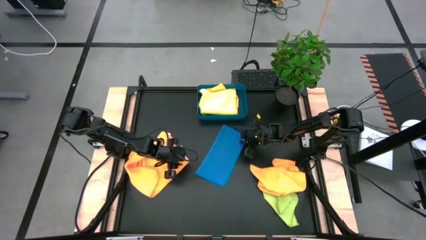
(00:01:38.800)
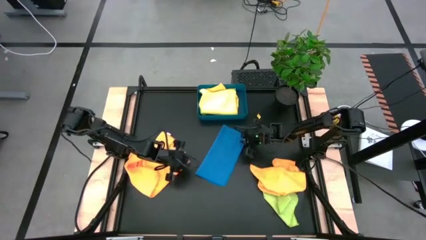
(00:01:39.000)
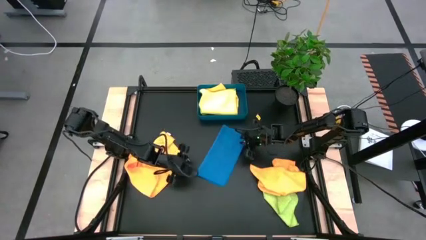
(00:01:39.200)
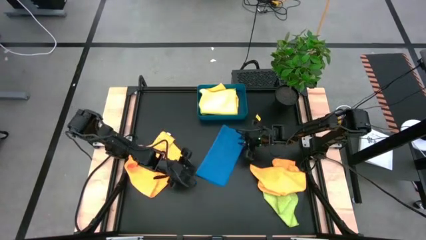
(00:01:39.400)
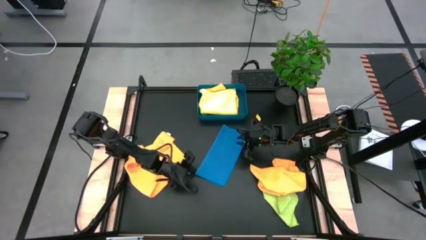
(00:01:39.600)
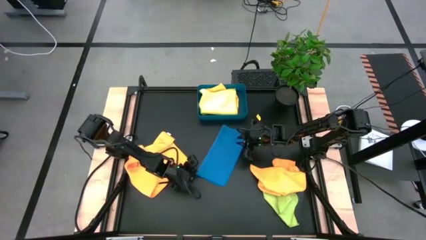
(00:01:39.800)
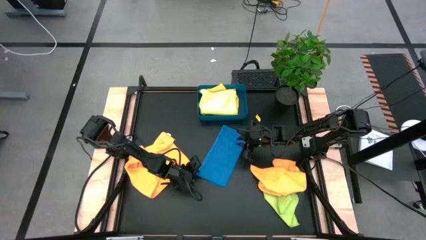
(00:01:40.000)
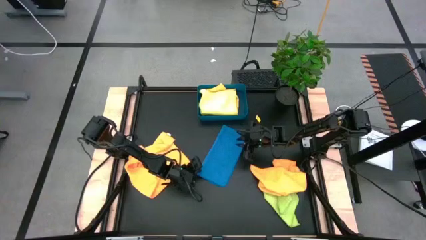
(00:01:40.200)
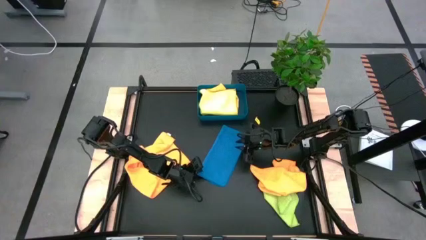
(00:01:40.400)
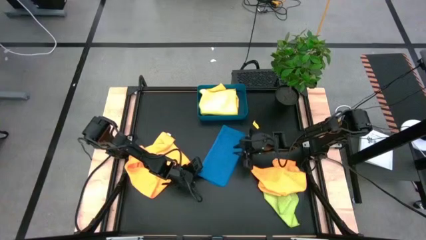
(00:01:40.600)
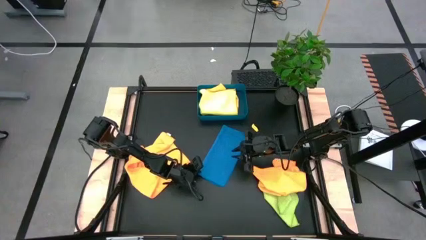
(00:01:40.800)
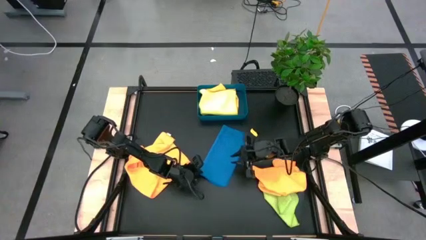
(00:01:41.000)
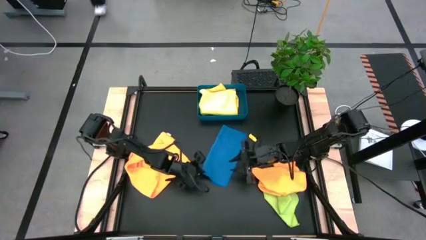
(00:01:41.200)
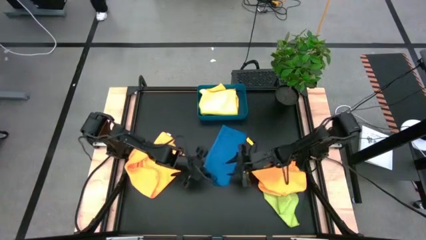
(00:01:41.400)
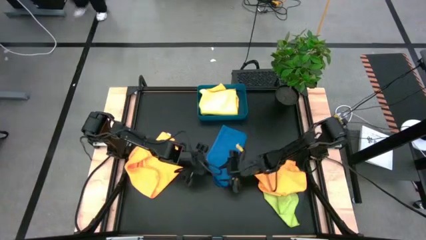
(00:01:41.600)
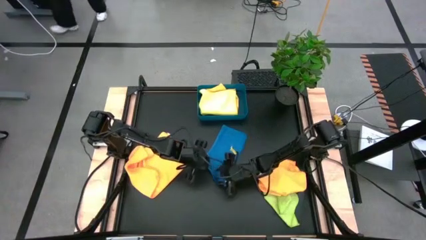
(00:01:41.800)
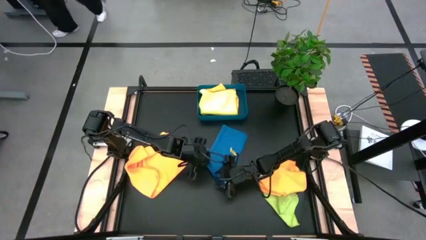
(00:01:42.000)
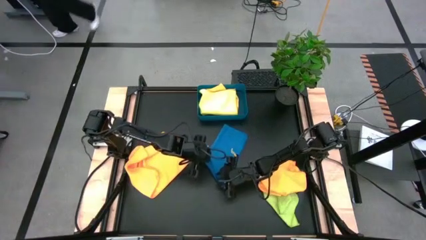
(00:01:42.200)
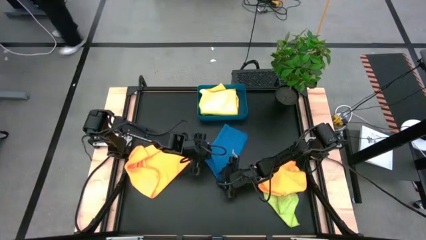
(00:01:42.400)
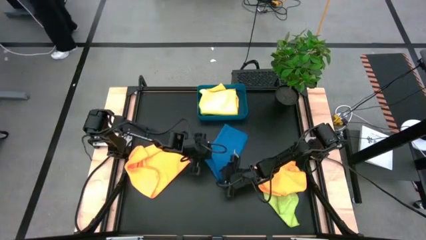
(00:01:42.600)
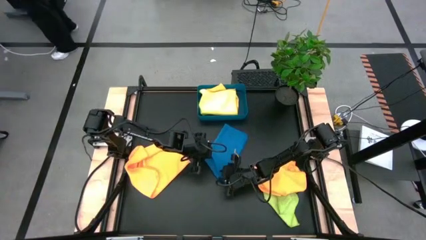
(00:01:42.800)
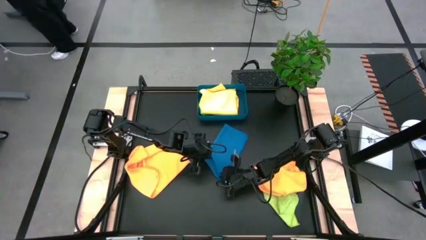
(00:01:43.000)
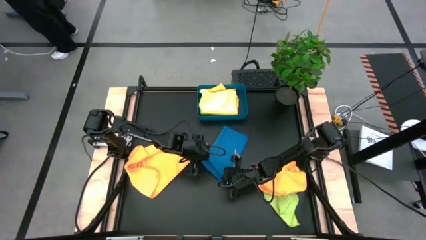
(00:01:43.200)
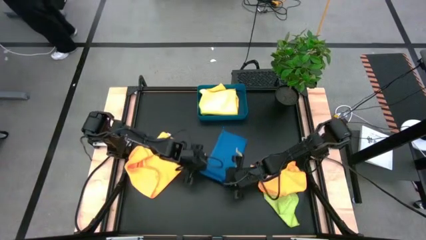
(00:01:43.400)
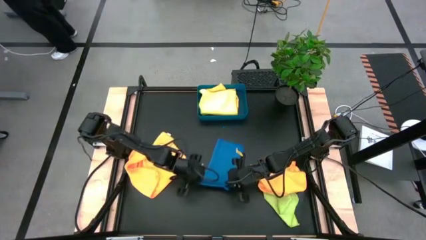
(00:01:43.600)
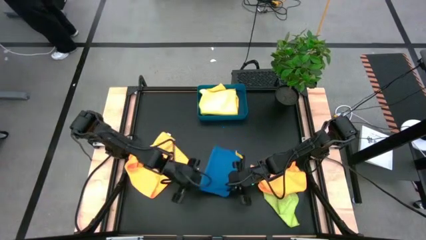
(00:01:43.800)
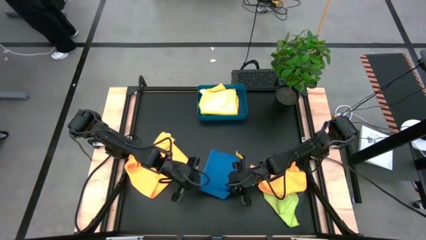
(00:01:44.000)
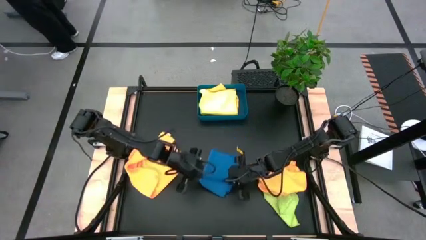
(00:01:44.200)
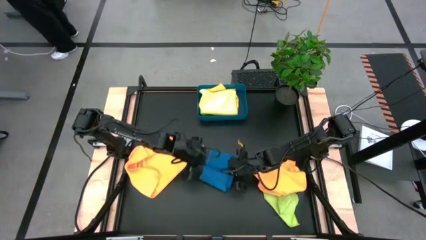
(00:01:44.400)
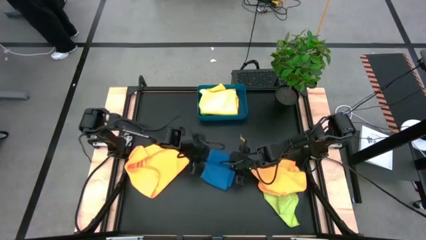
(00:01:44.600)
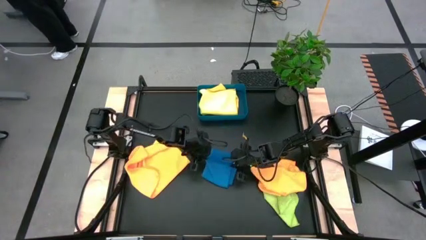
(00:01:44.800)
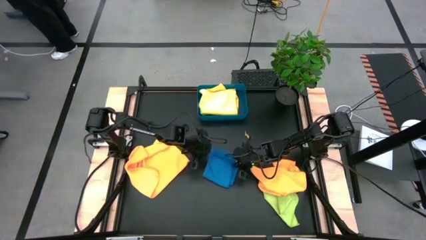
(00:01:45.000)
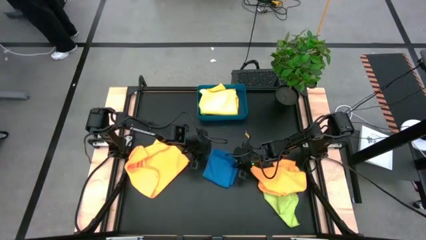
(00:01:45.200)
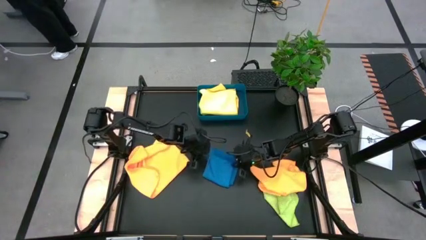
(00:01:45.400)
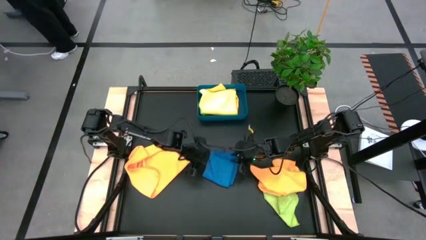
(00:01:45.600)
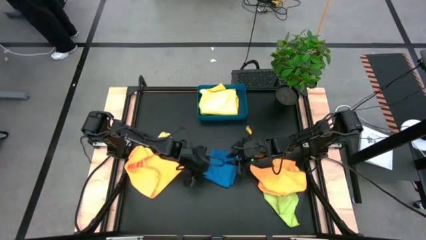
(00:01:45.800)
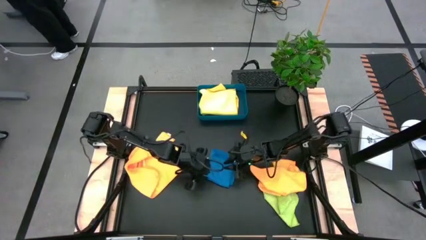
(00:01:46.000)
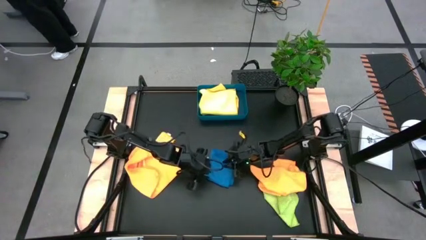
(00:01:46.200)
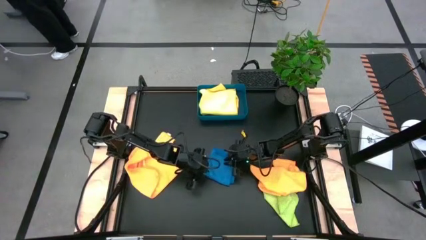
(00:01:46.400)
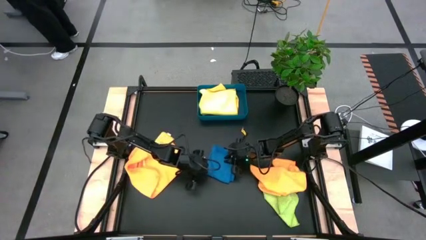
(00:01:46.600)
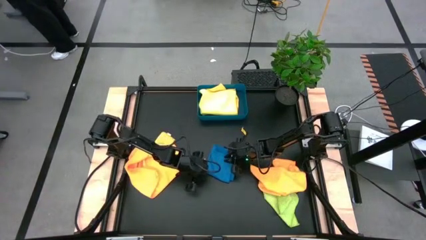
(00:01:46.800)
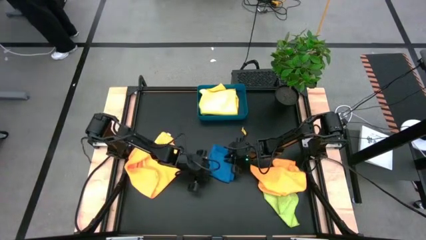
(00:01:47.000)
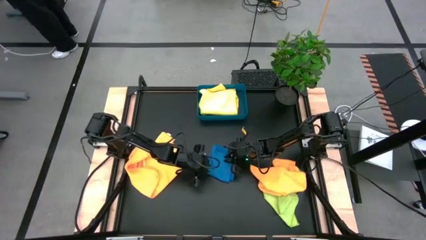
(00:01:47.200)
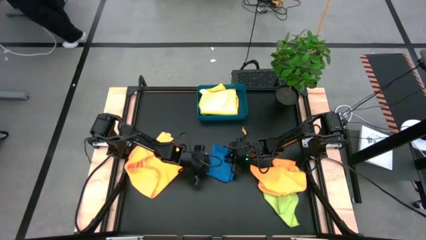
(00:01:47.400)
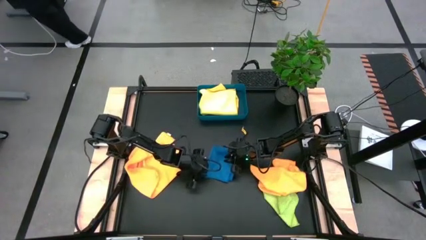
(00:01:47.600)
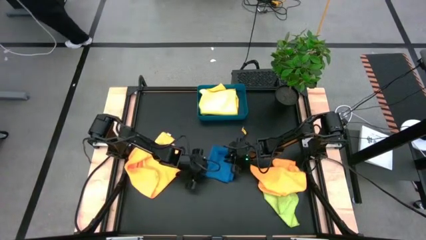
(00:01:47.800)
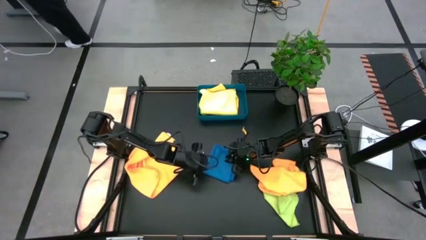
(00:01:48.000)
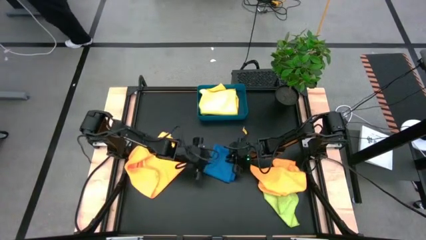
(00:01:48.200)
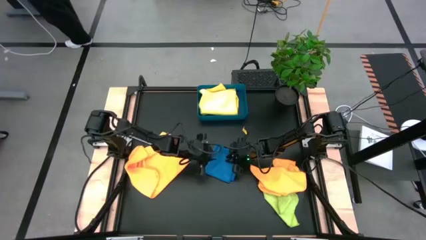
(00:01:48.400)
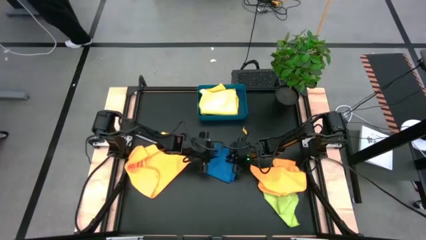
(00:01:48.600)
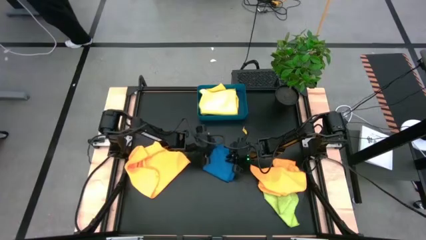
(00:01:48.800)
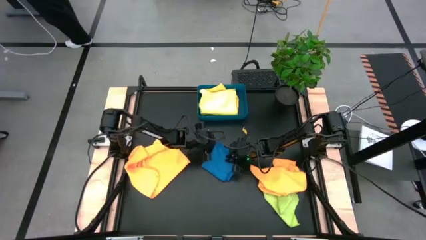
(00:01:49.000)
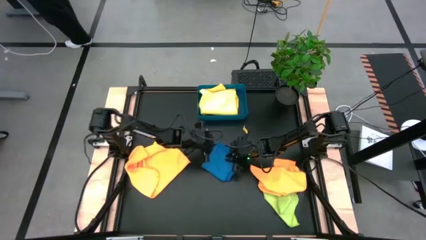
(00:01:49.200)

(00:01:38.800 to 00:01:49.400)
Task: Fold microfiber towels
Fold the blue microfiber towel
